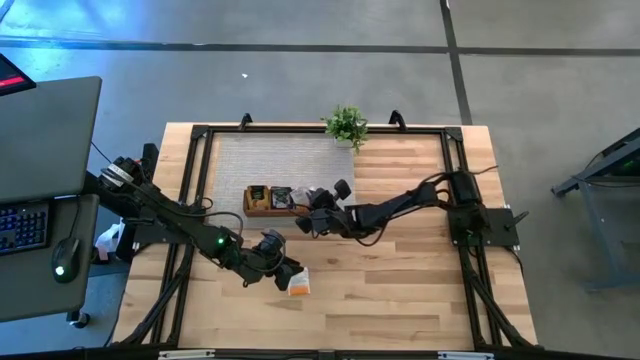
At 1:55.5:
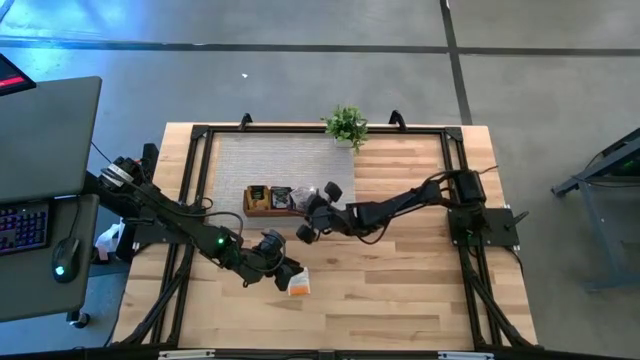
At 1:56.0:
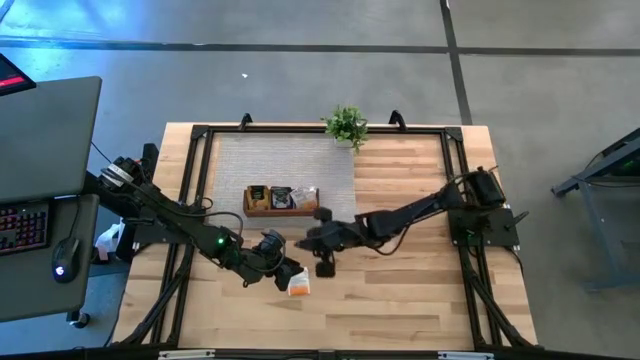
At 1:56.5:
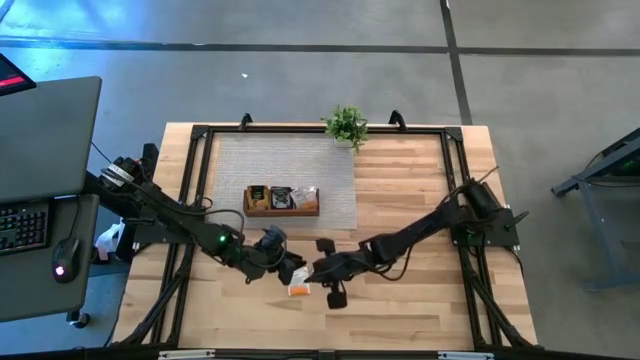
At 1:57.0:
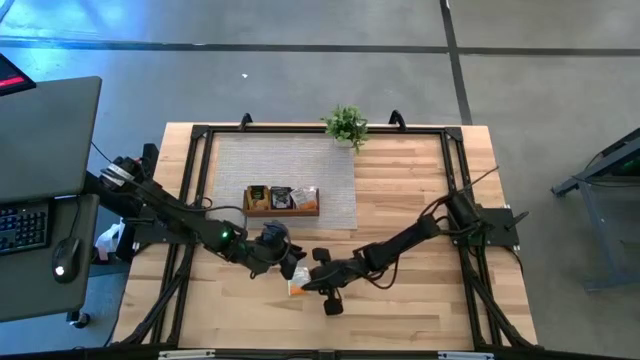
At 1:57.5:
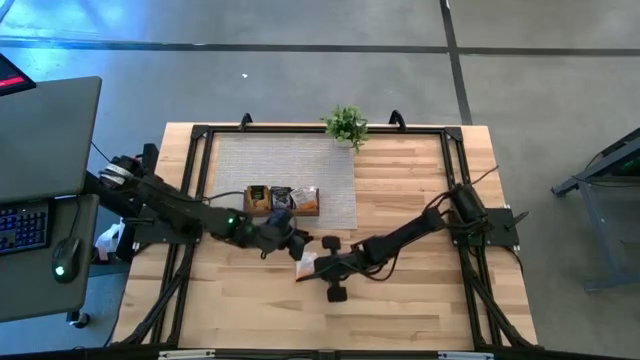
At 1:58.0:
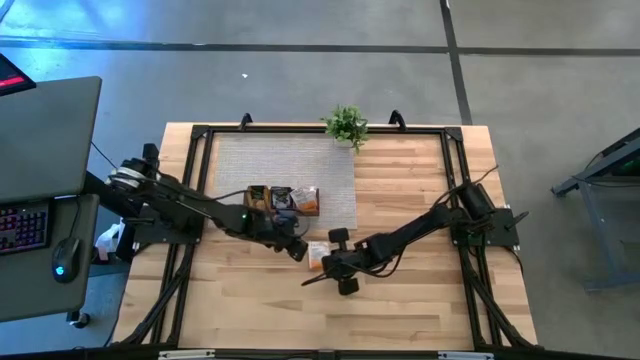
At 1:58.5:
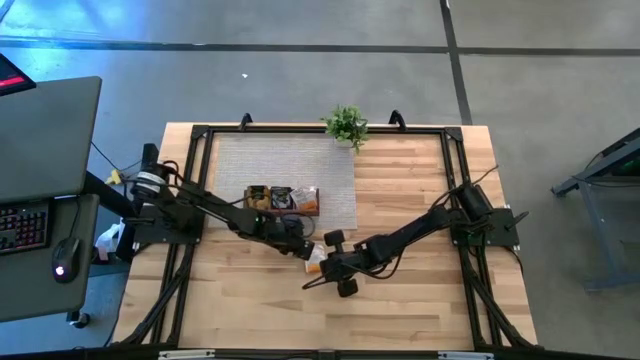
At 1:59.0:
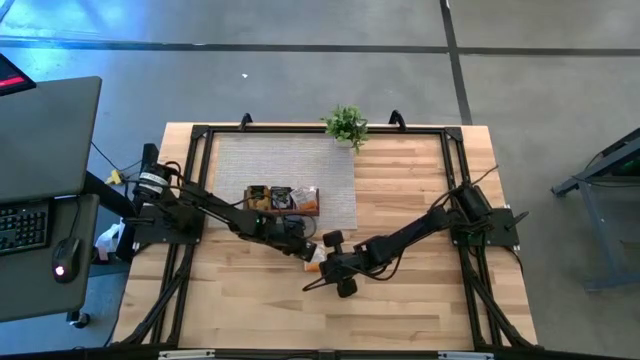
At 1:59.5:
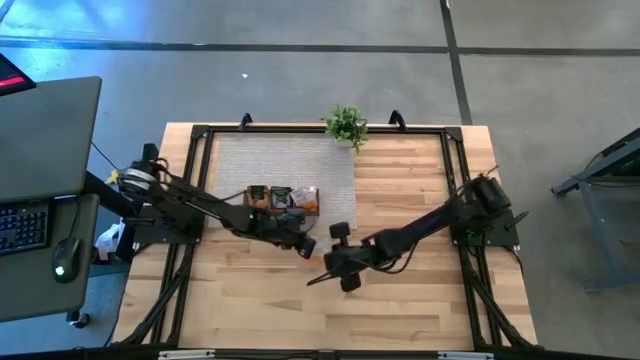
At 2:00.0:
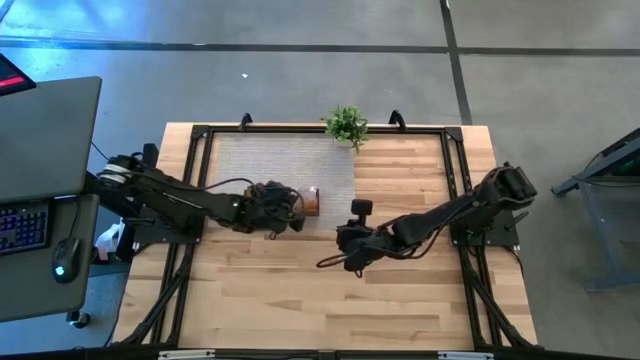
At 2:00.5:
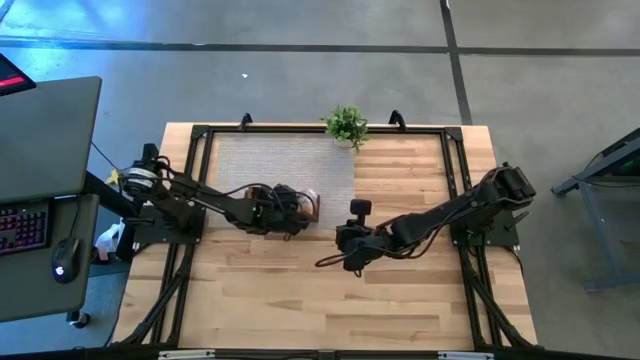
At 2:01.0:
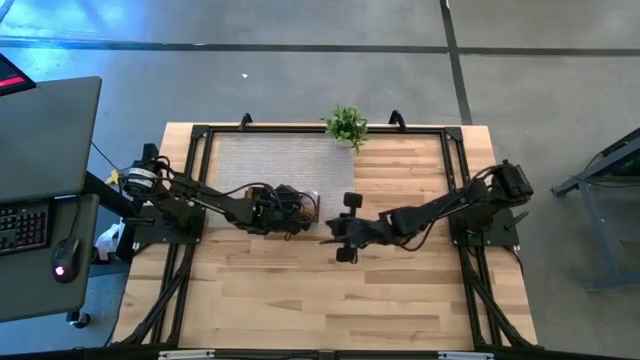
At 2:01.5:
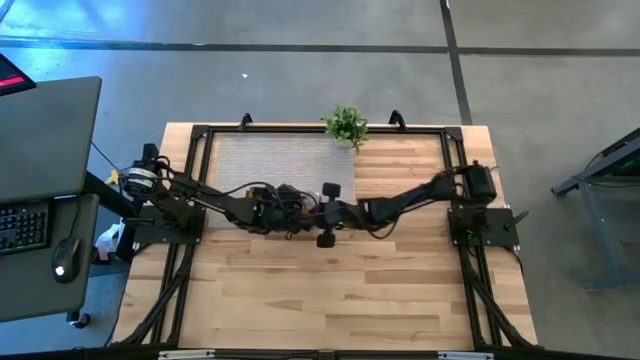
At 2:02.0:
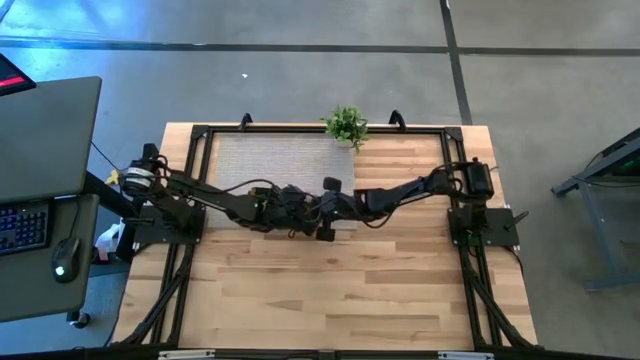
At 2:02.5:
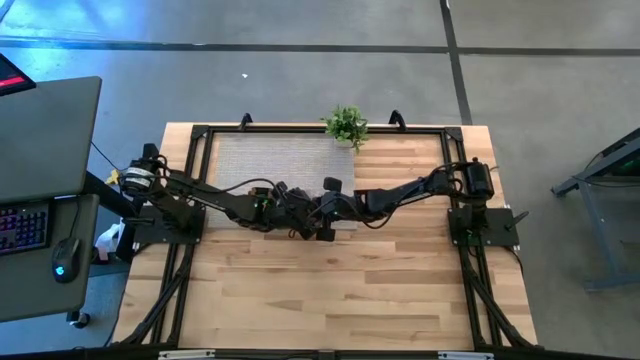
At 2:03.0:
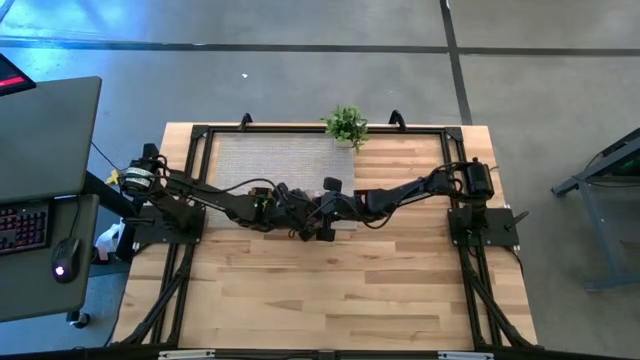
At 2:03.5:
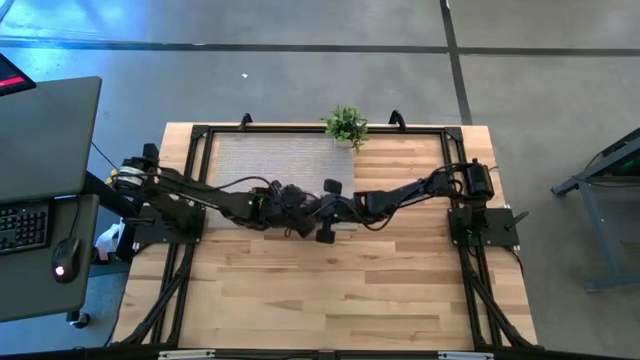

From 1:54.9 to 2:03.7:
Task: Pick & Place Tea
Put the orange tea bag into the right section of the wooden organizer

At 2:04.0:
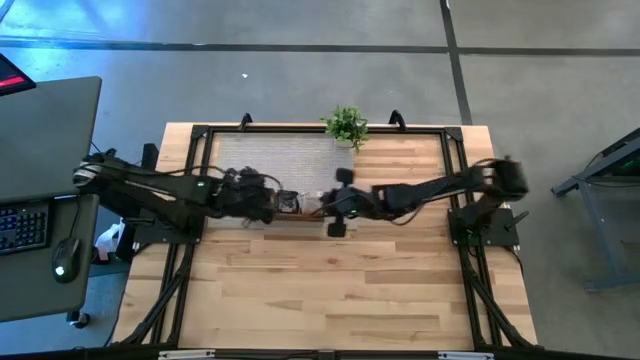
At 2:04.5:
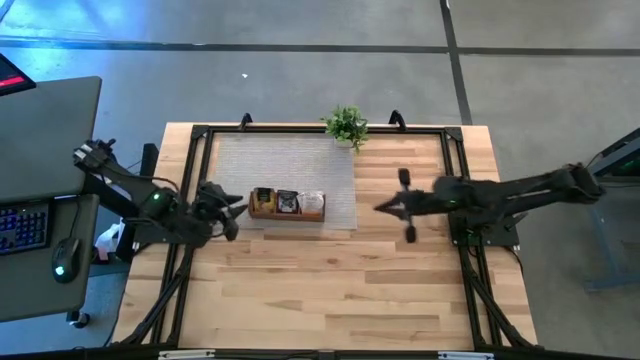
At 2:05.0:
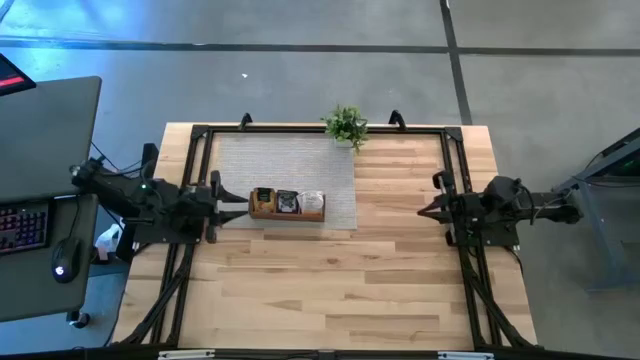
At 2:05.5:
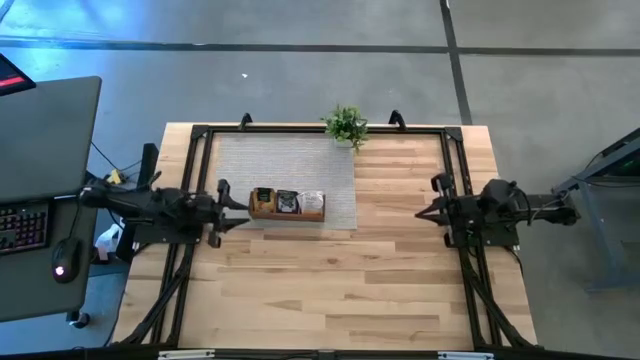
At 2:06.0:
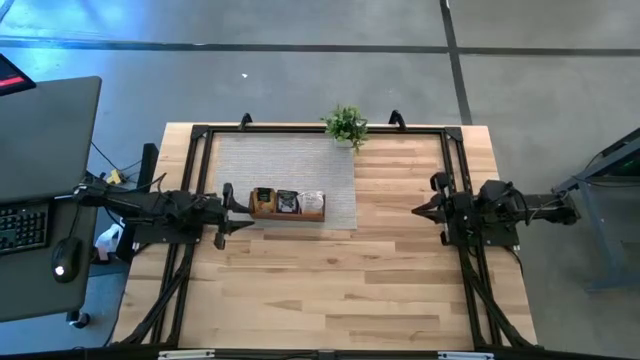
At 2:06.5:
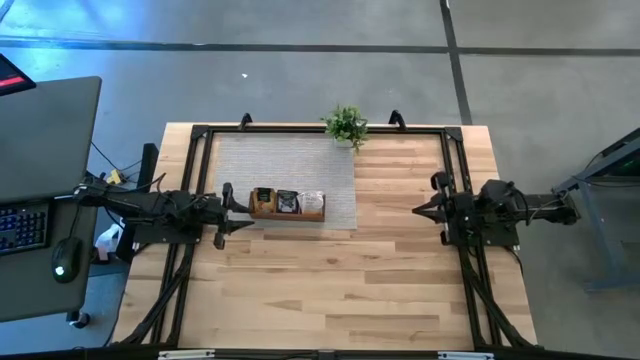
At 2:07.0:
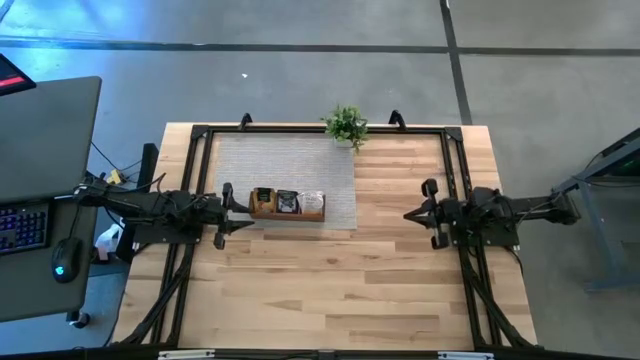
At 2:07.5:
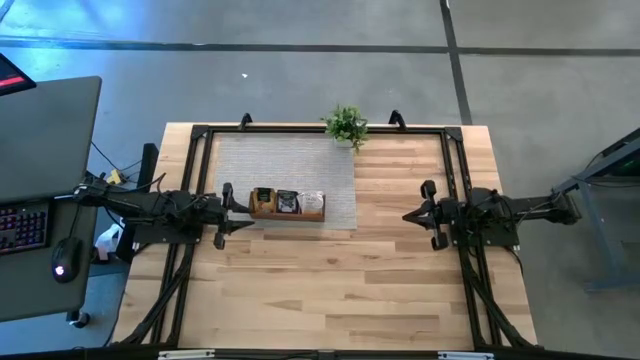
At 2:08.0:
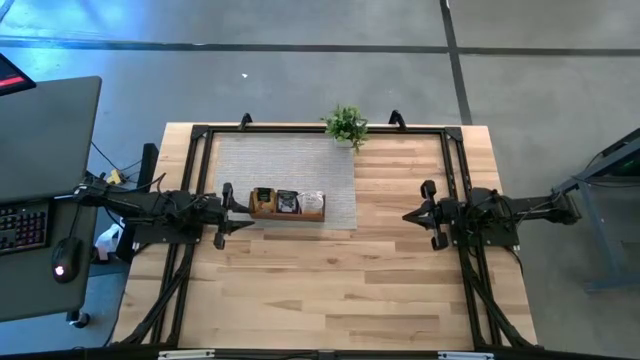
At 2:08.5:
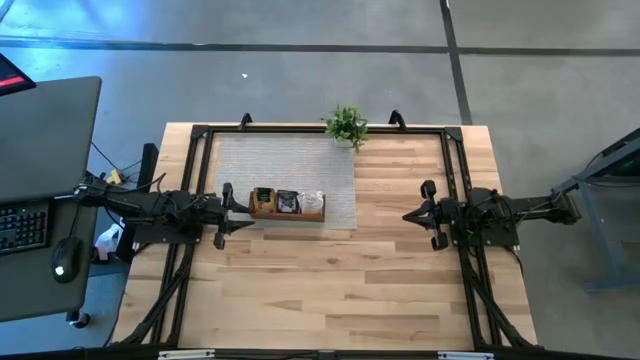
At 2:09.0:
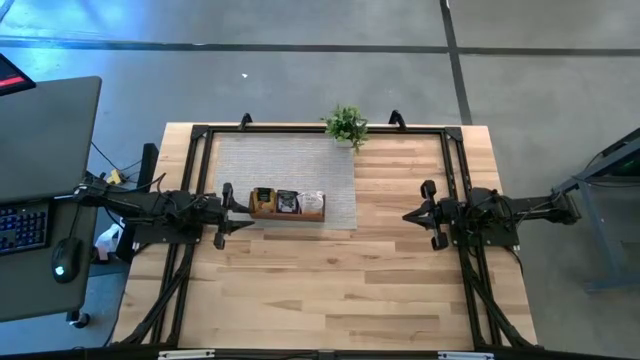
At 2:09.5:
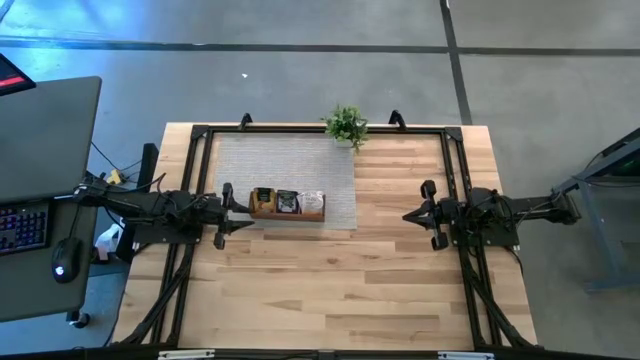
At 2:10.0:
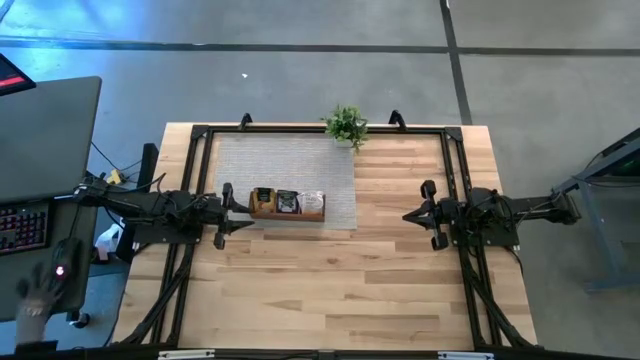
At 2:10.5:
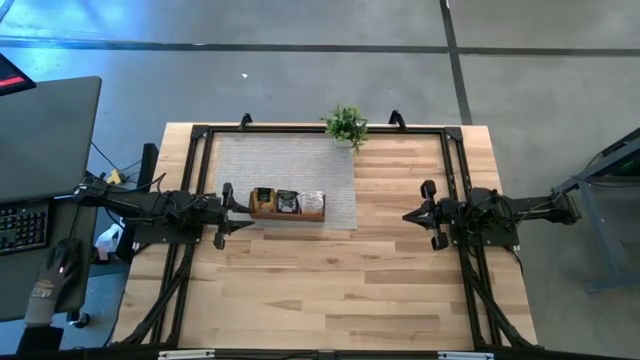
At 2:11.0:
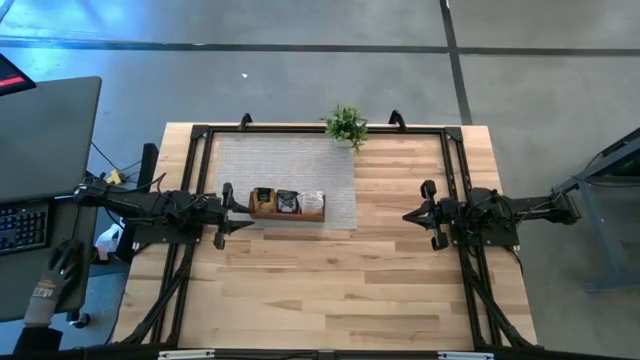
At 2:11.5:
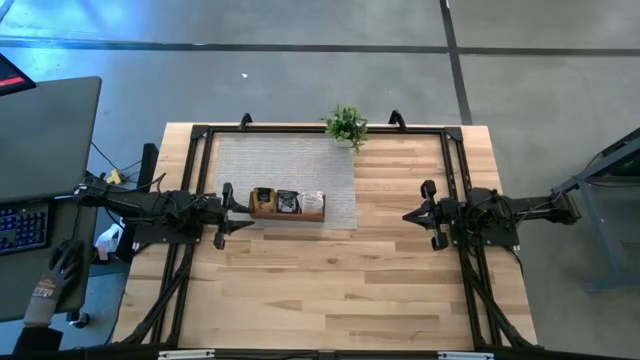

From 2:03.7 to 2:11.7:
Return to Home Position

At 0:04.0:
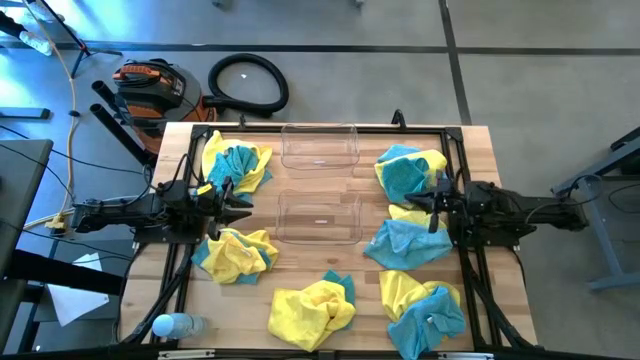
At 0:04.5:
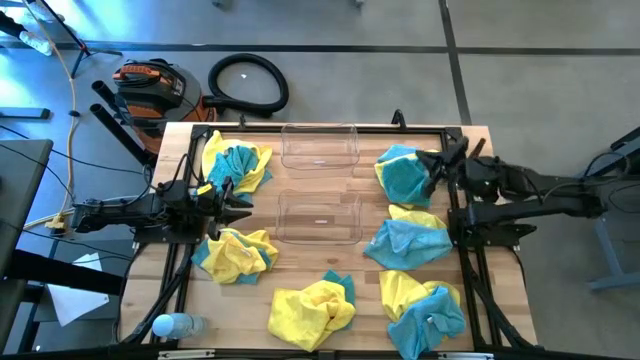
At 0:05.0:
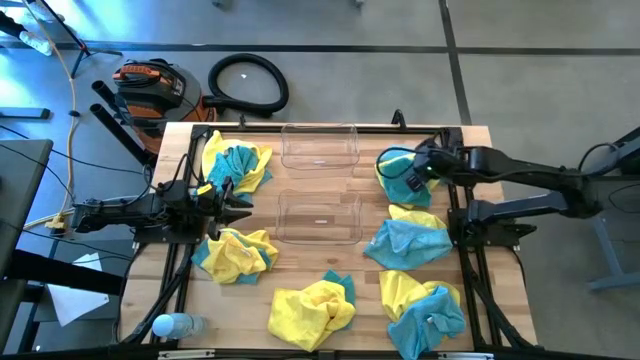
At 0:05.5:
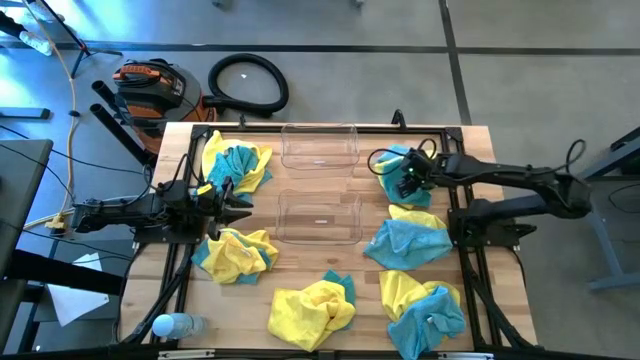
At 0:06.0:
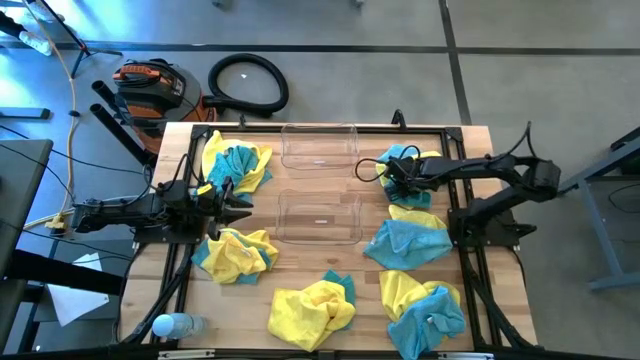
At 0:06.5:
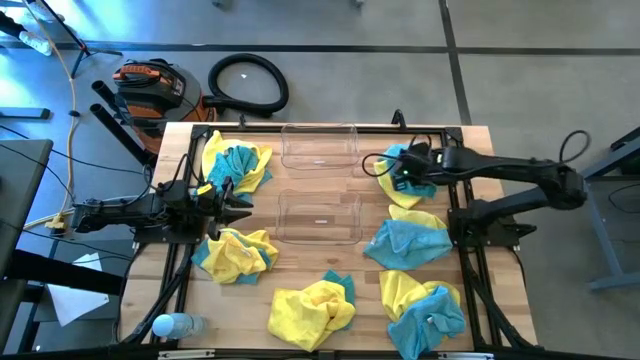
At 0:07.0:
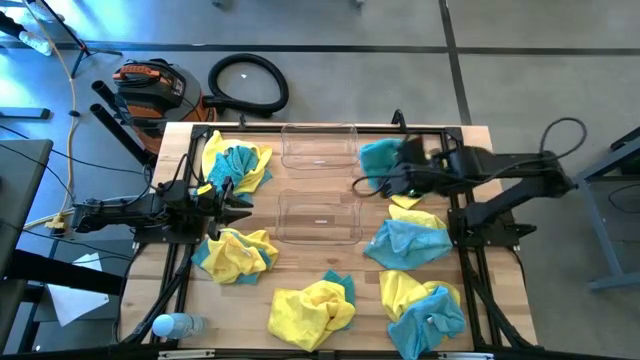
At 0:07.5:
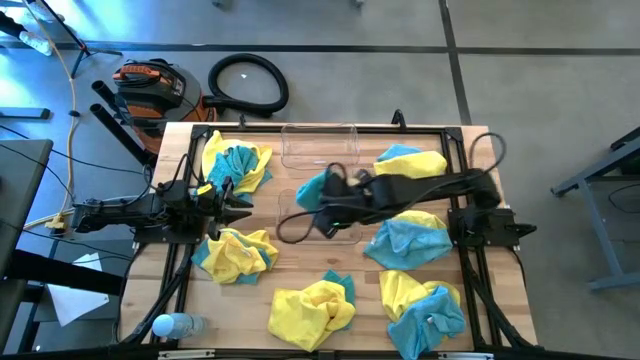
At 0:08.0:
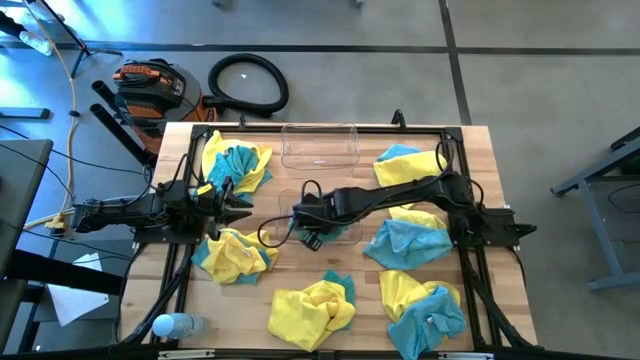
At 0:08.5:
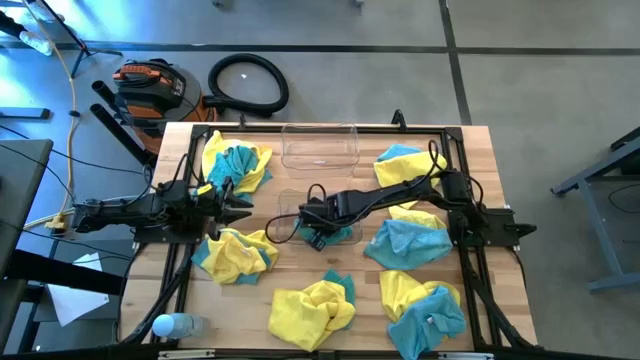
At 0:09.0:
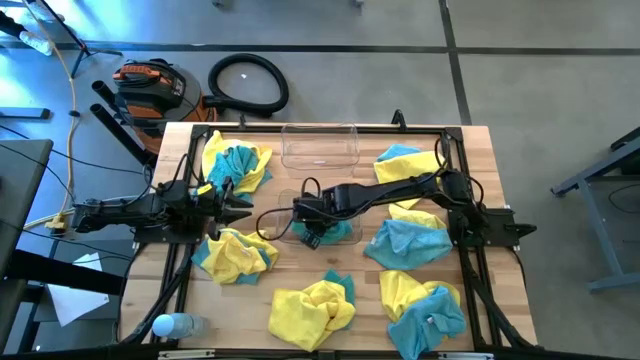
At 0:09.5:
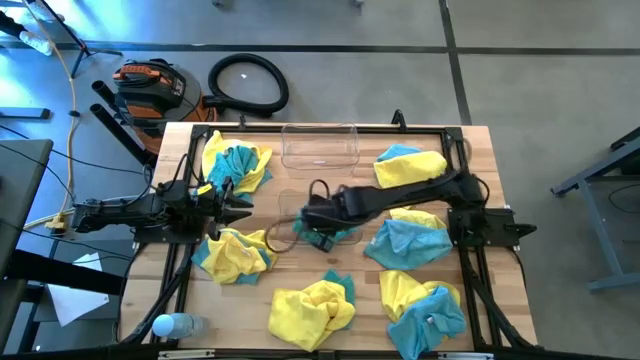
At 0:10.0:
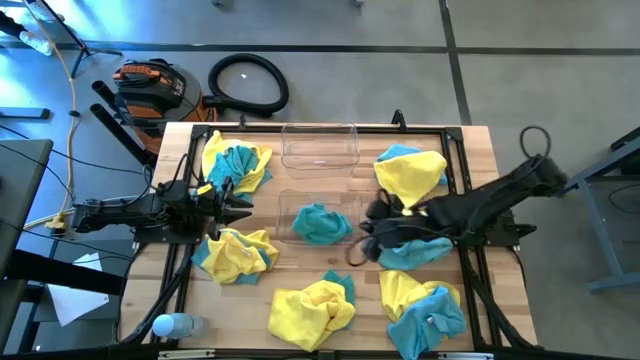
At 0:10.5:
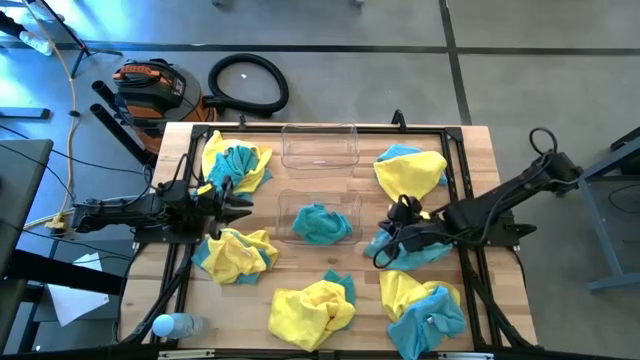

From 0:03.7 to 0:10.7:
Task: Sort microfiber towel by color & place in baskets
Put the blue microfiber towel into the bottom transparent bin
